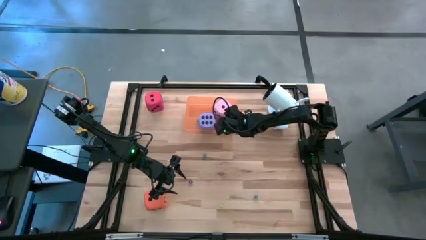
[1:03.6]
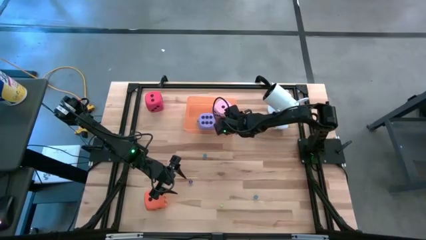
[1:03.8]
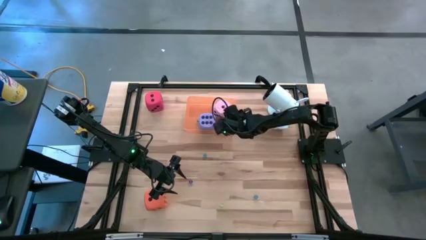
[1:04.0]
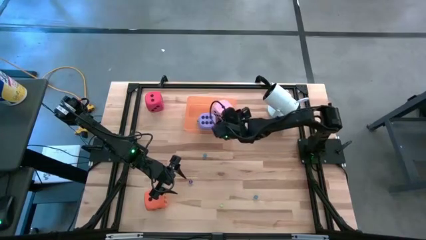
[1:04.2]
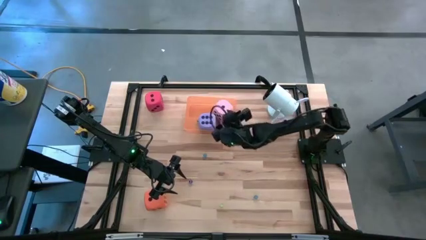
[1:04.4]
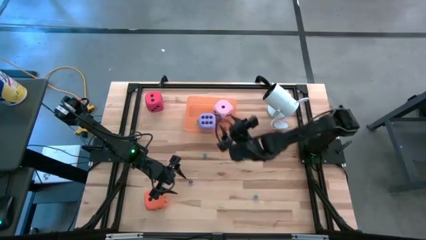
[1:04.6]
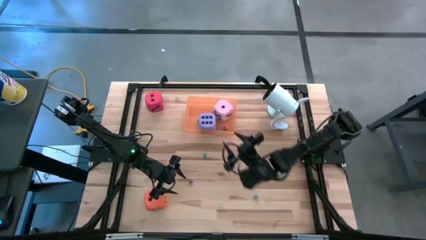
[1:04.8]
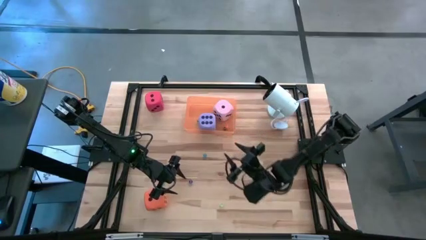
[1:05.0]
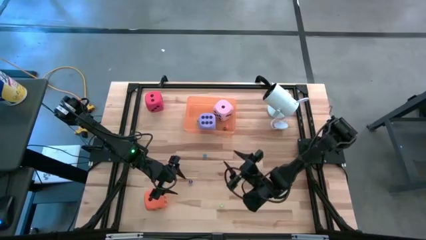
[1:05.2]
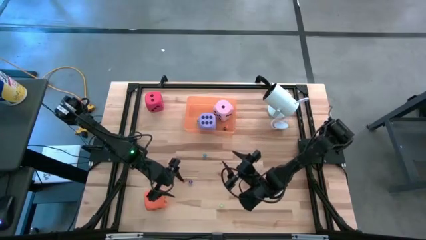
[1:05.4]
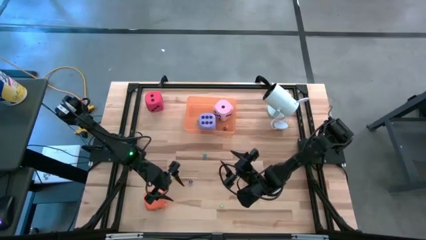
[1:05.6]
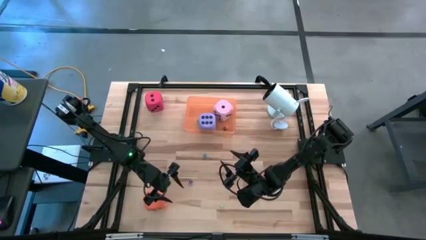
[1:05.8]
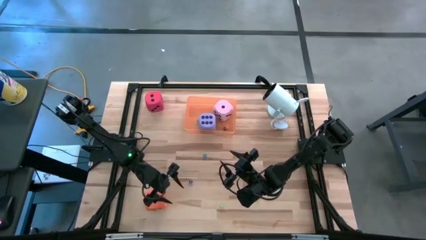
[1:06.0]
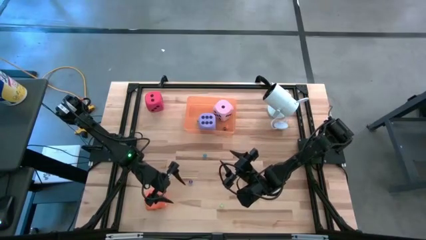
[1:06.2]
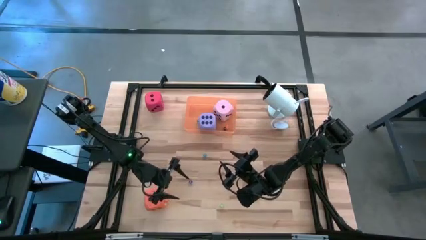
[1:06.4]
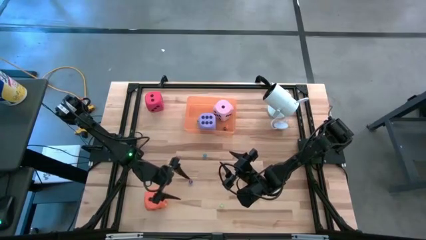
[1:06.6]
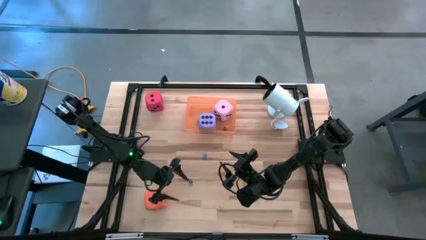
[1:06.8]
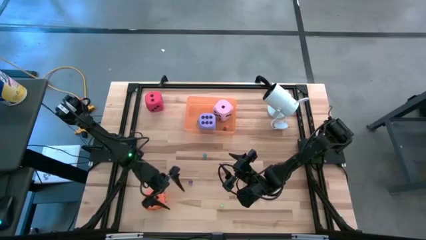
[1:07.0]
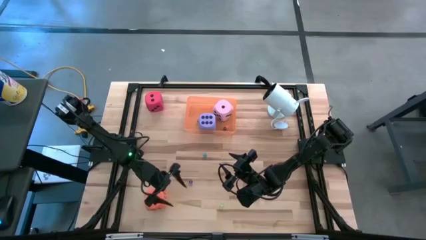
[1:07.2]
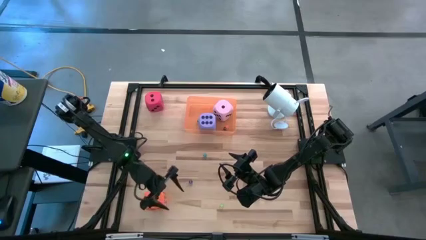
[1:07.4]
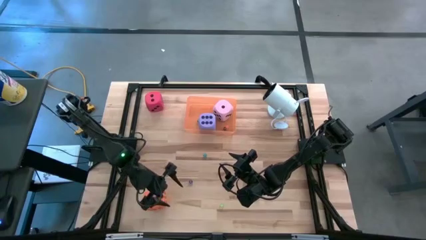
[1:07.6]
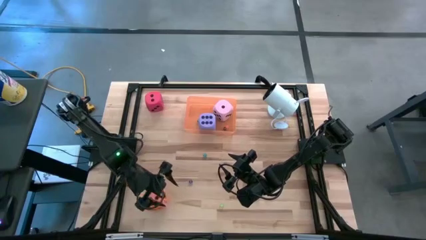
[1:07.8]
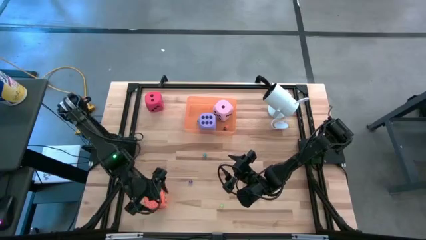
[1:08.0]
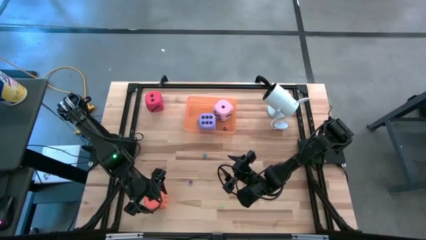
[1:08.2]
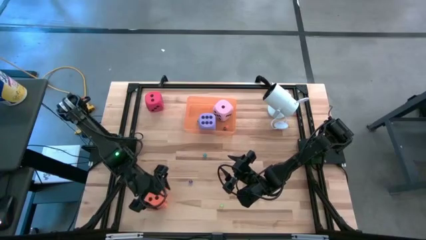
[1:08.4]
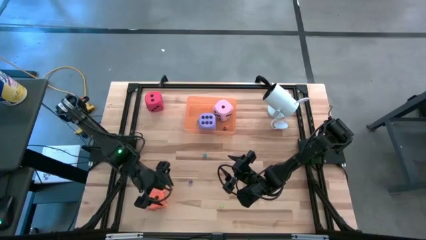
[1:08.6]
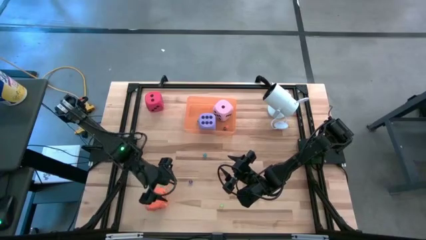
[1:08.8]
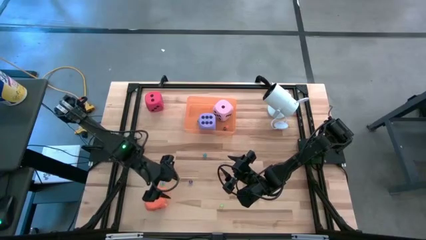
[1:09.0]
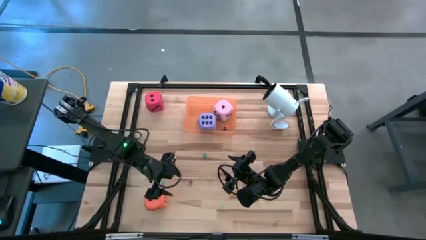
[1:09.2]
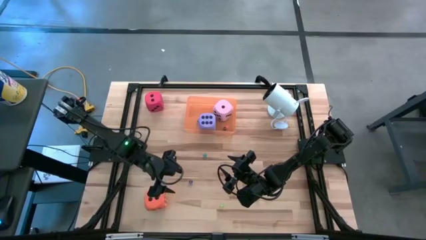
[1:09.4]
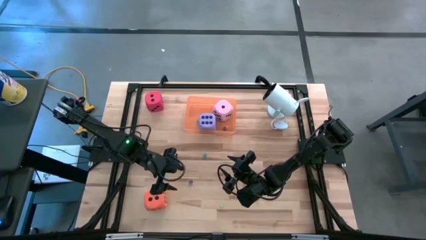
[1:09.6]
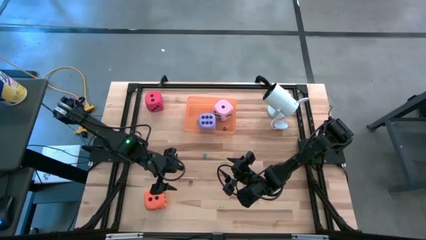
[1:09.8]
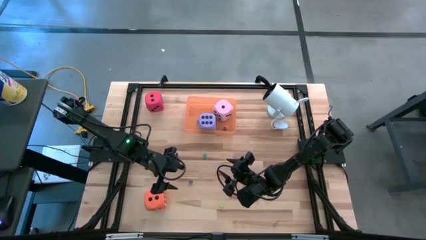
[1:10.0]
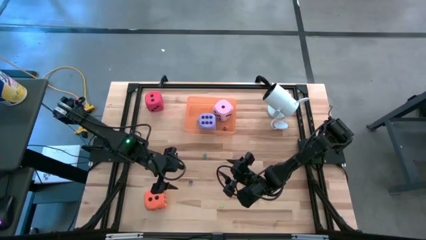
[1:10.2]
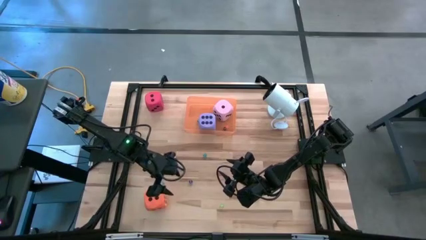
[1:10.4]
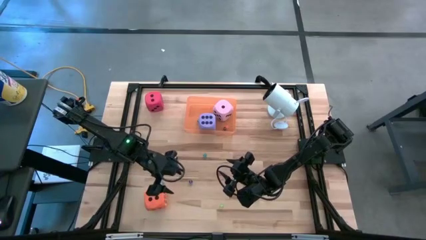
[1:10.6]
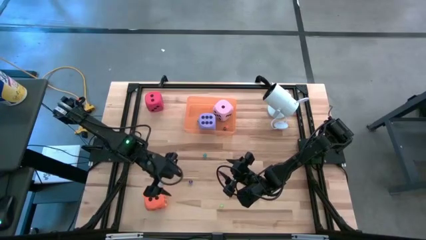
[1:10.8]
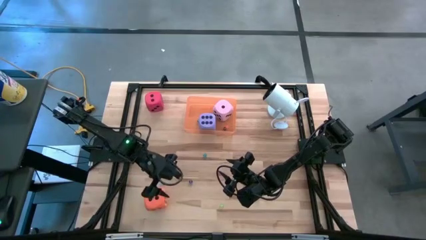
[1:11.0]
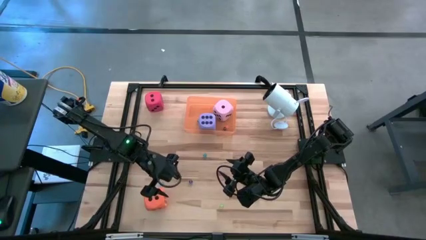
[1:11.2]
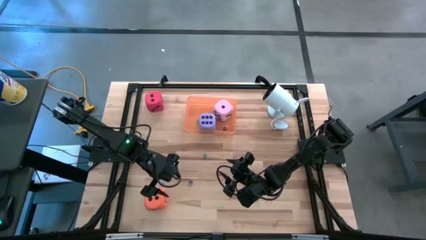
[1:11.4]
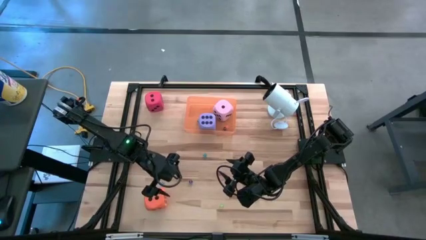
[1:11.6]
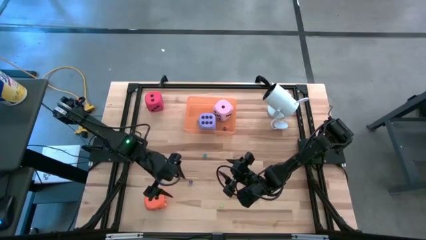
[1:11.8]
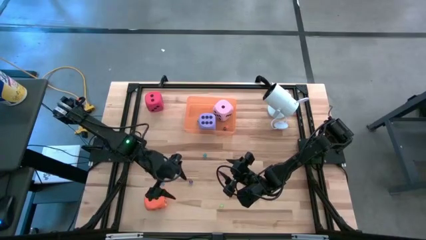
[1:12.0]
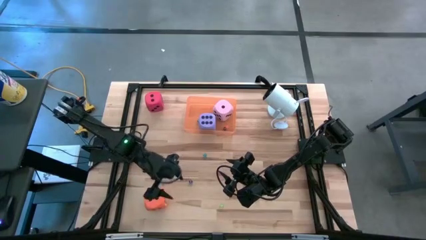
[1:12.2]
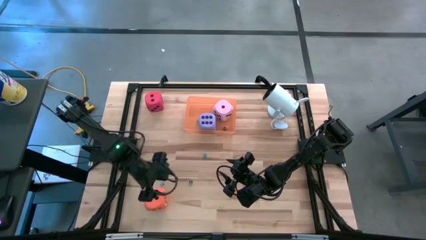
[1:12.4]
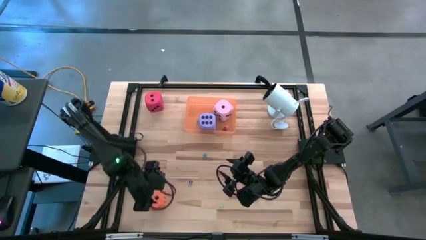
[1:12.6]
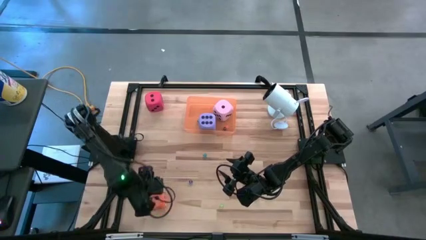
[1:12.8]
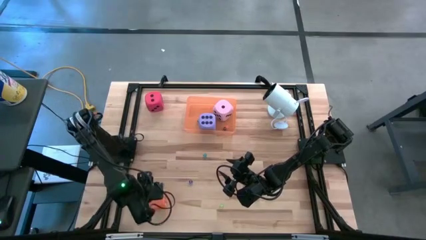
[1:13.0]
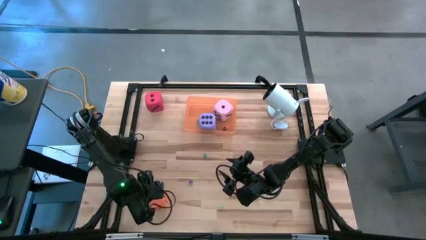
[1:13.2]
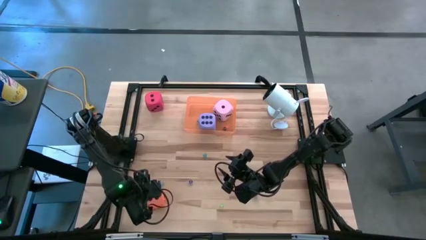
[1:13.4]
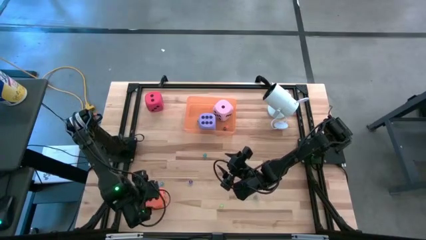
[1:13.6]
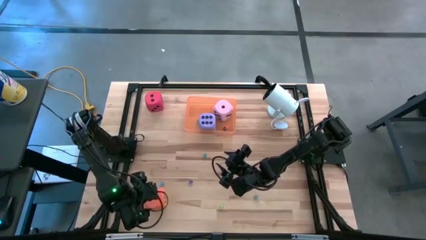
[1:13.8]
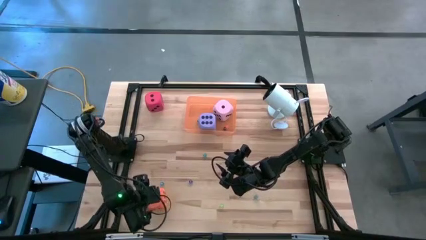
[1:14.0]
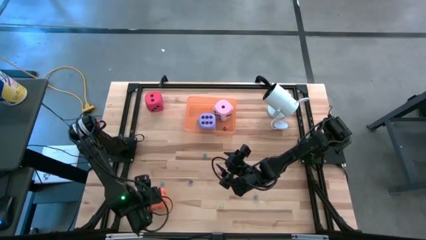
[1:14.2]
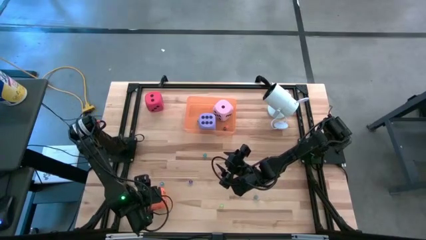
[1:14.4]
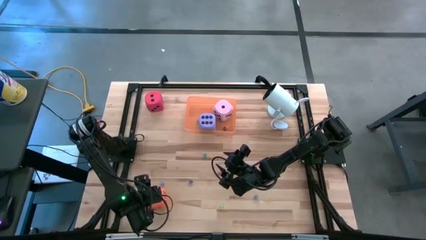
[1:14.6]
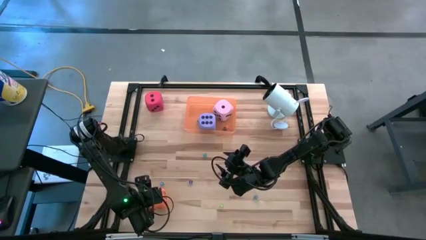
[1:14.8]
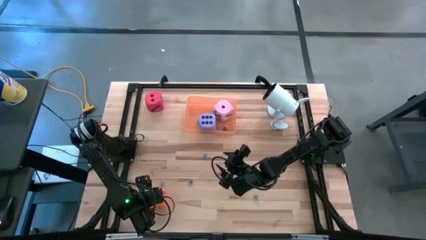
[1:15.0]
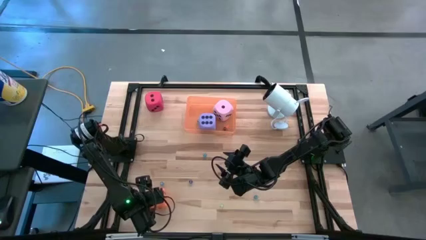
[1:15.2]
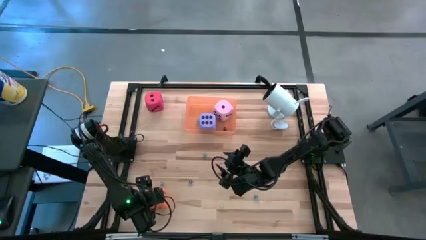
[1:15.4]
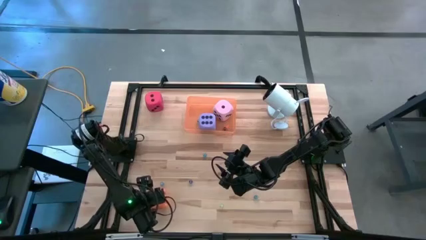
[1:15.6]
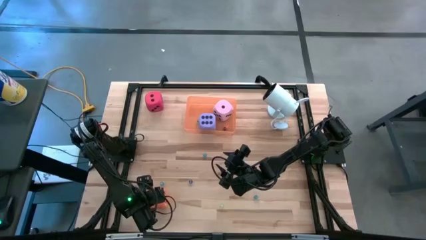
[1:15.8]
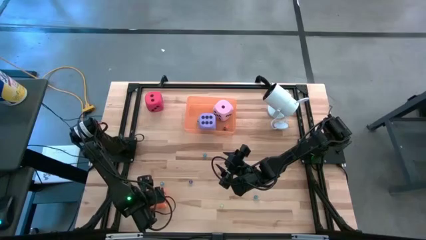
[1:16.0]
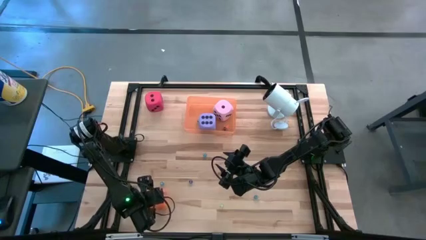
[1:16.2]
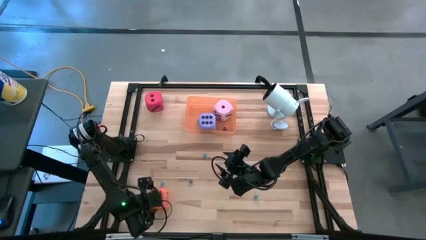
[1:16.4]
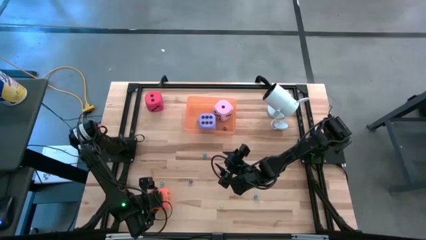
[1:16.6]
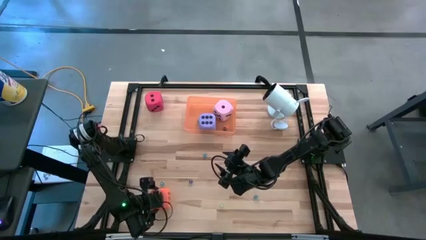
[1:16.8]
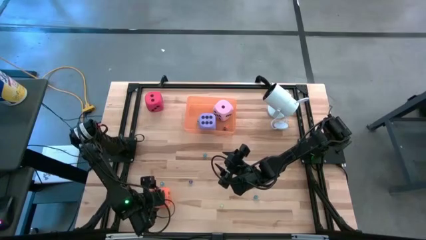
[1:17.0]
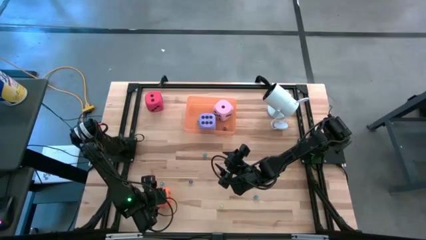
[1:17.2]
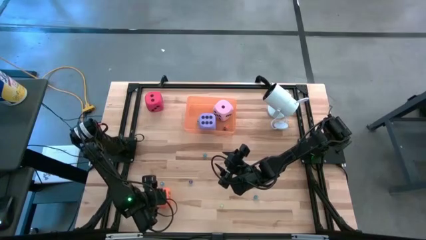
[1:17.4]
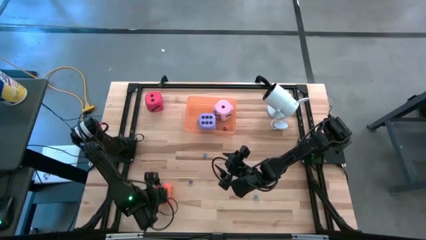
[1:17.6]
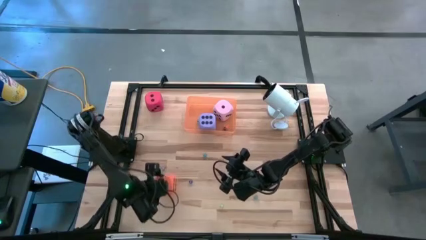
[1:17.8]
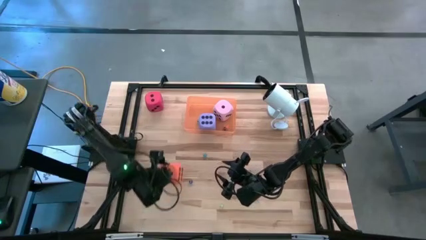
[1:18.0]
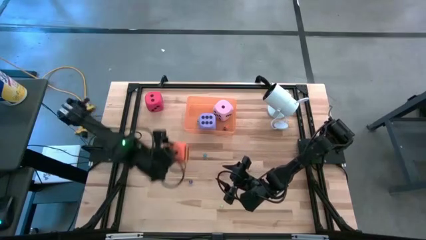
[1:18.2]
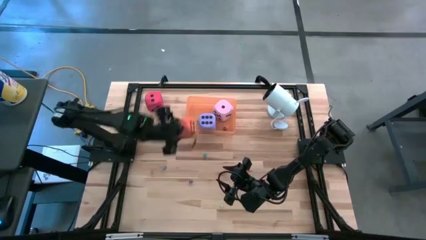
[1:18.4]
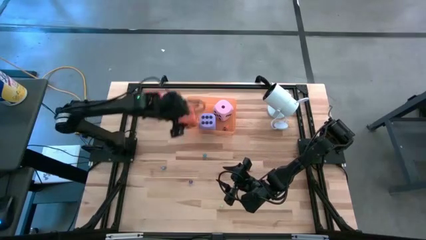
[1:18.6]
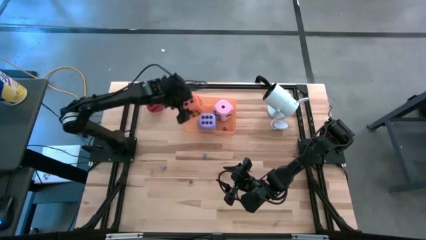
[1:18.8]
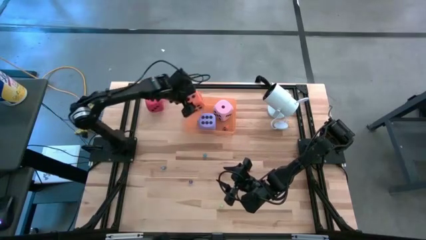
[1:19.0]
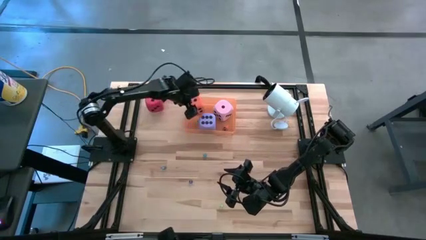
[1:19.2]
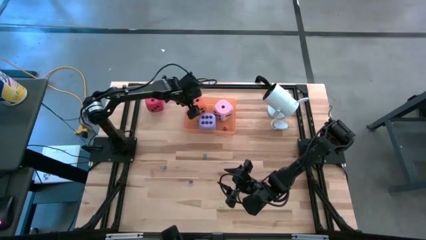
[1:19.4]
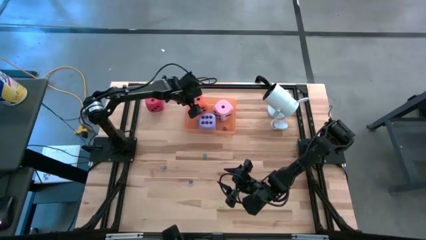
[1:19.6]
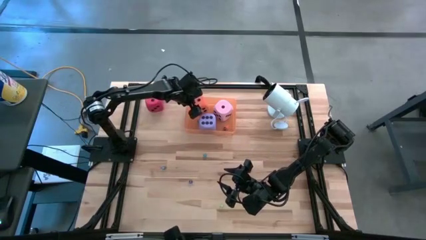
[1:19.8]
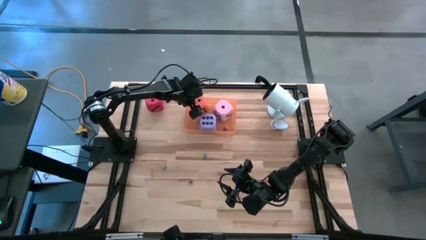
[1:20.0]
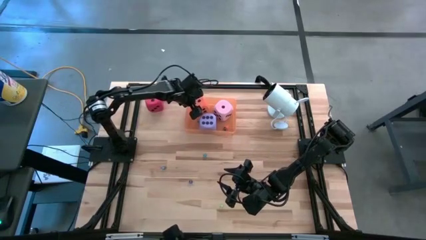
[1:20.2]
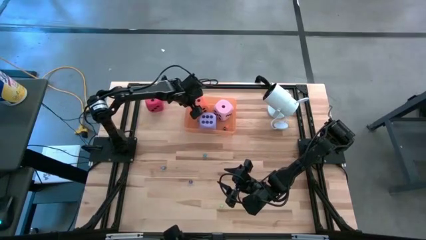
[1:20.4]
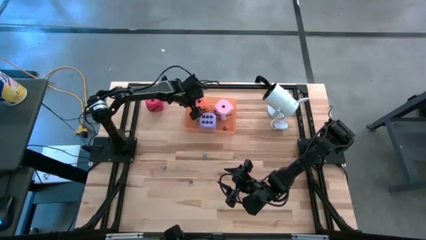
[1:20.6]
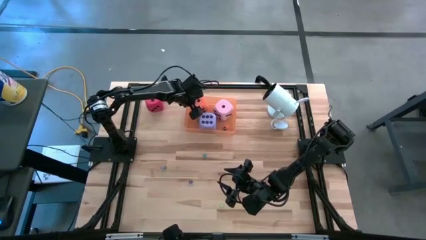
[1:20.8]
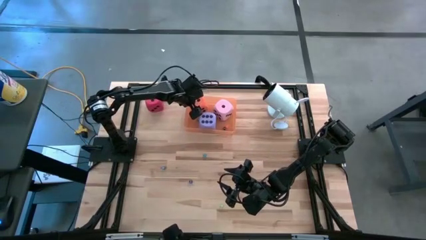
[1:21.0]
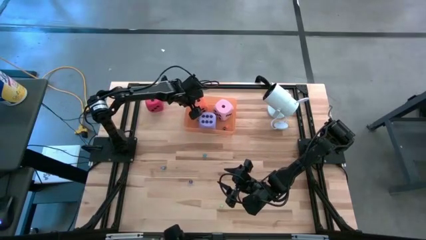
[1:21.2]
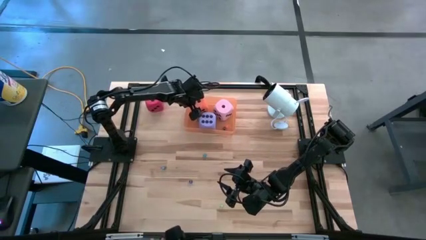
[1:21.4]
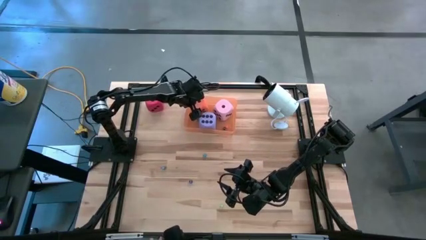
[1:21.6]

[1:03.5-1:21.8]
Task: Pick & Place Dice
Put the large orange die into the orange bin
